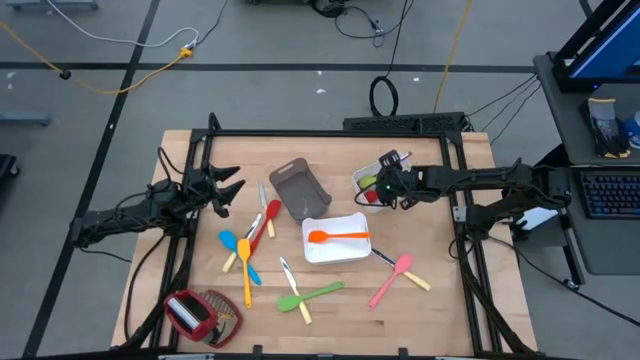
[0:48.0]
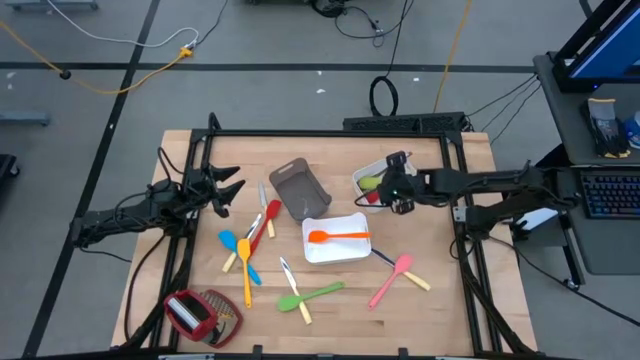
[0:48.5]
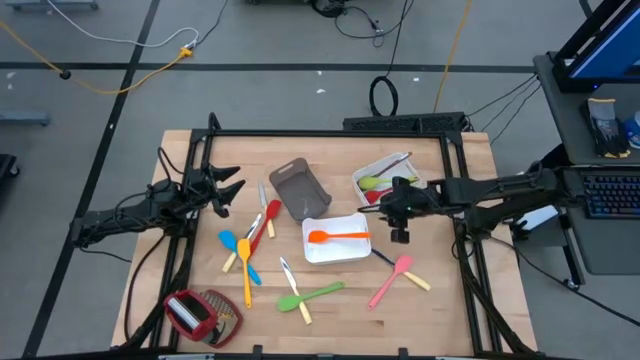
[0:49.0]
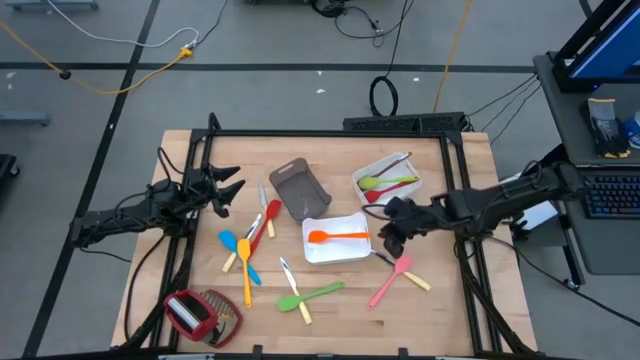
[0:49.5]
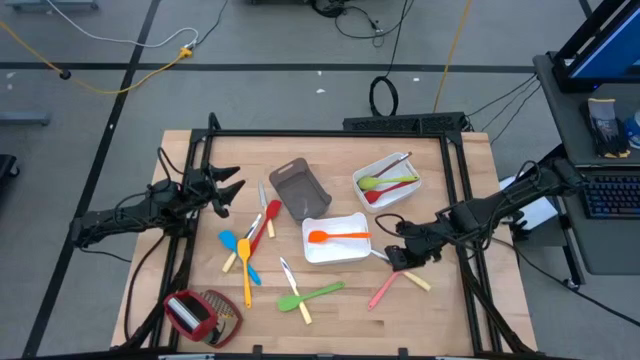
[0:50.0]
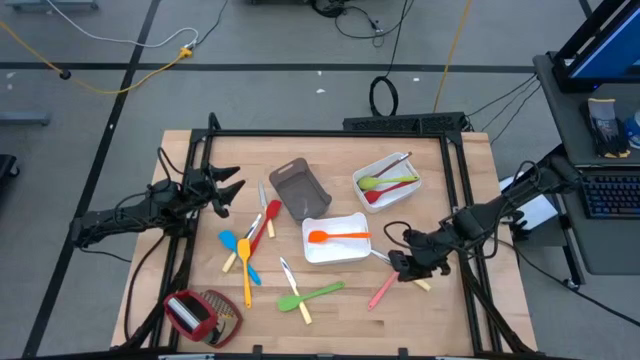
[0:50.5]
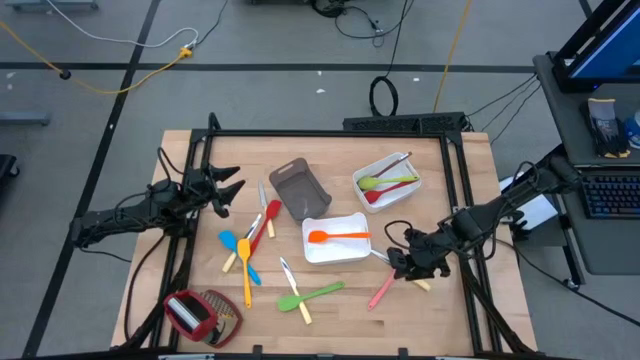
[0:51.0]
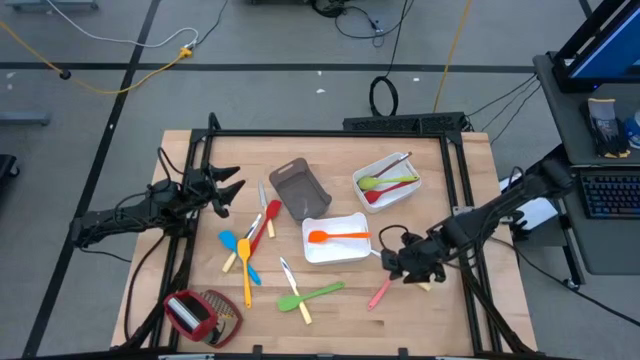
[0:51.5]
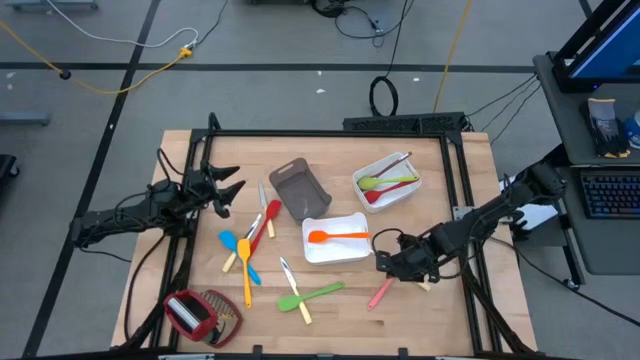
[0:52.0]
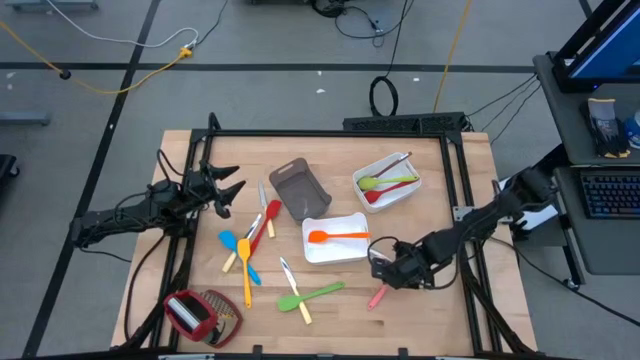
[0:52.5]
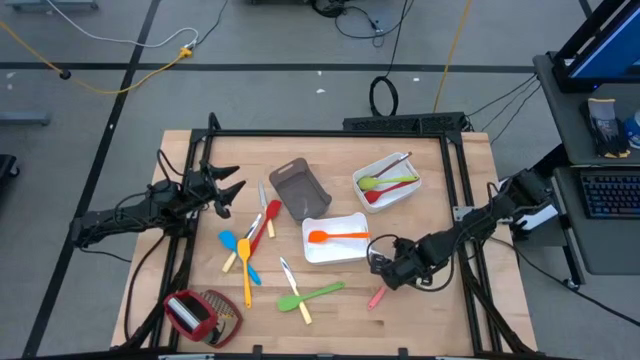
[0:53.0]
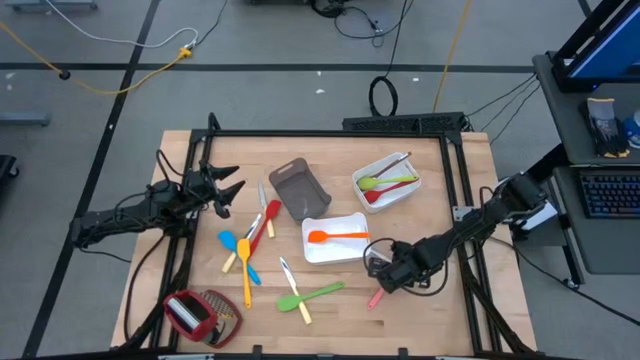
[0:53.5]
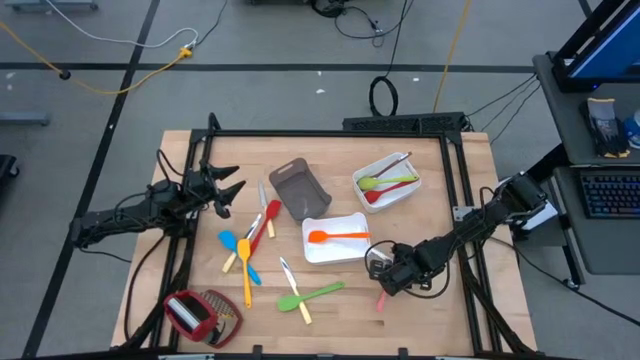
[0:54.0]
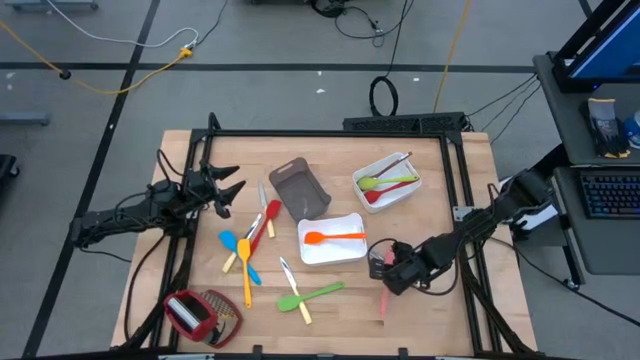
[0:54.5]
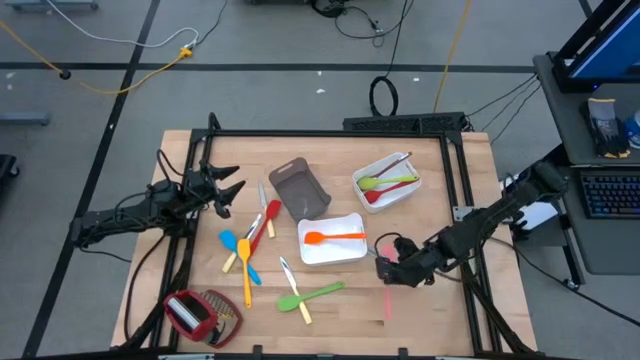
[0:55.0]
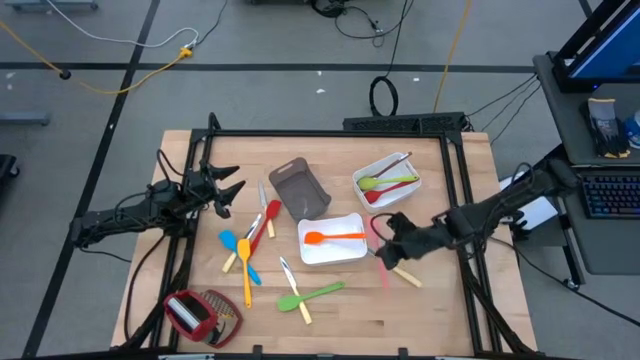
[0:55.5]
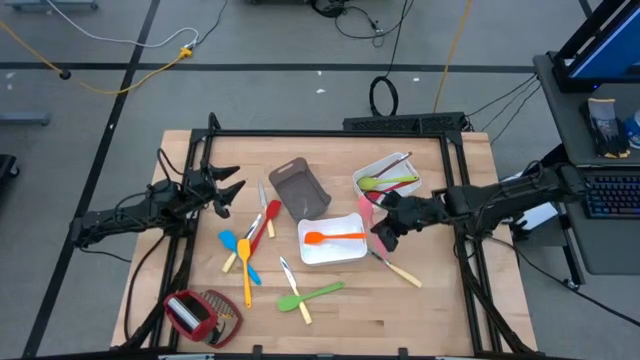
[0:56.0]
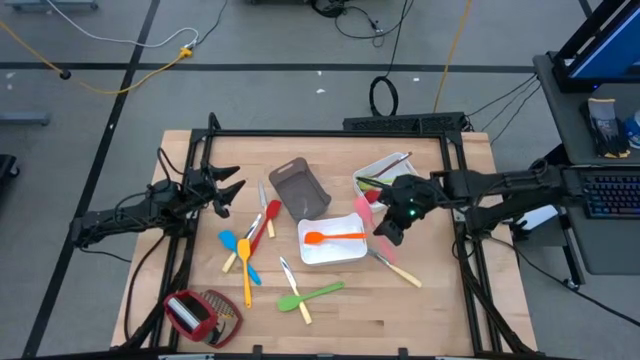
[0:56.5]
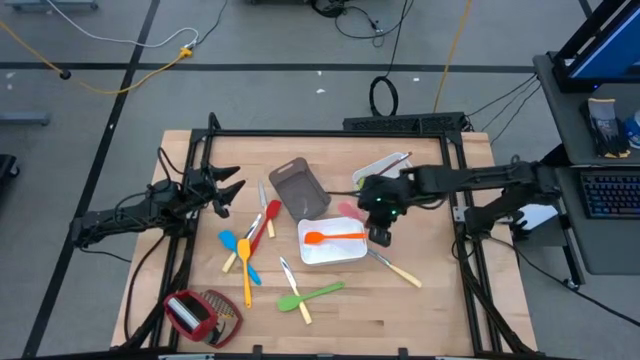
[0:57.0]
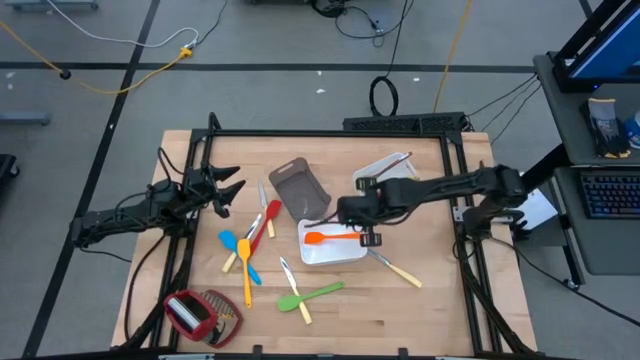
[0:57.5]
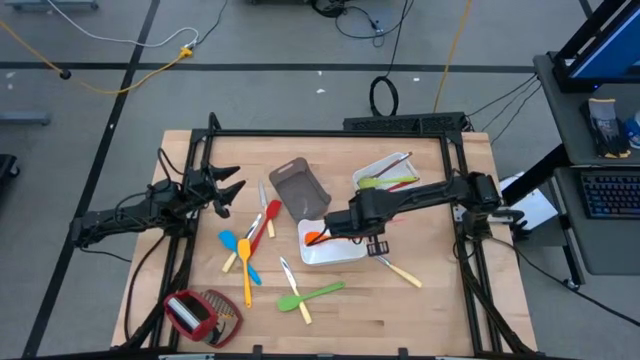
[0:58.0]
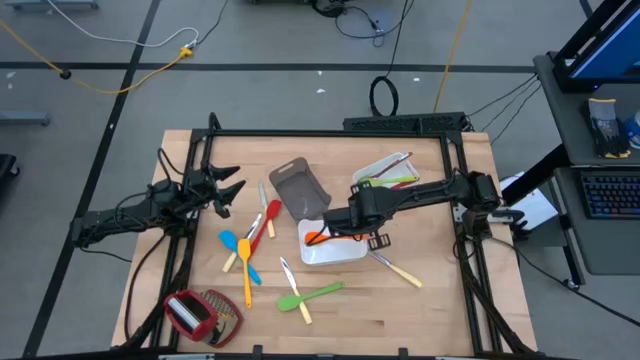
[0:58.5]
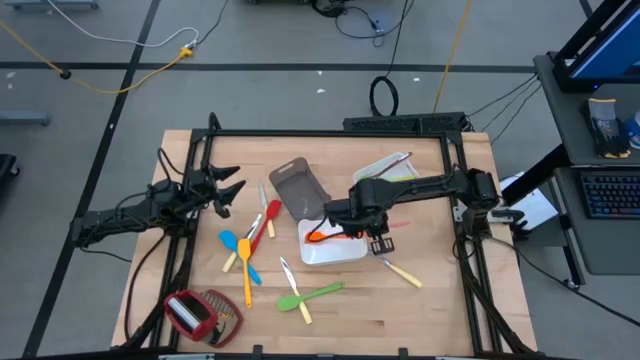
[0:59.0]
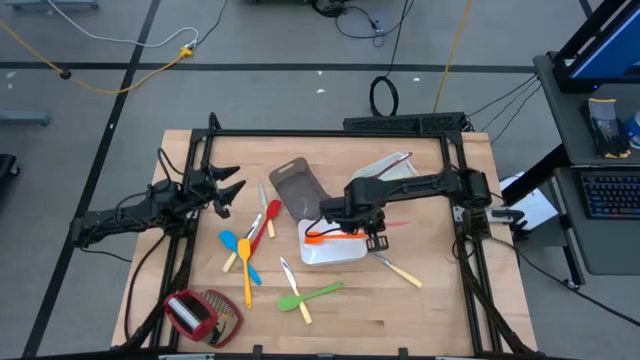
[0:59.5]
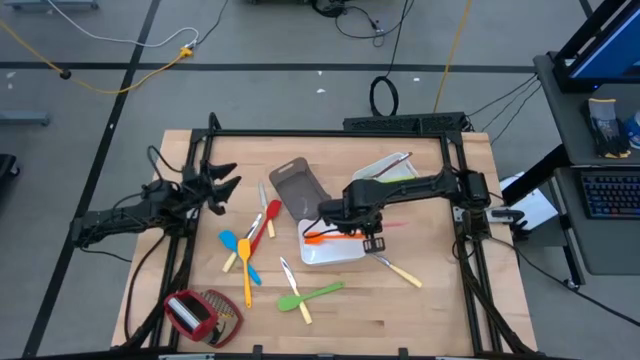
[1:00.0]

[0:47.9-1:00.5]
Task: Pick & Place Kitchen Items
Put the pink spatula into bottom white bin

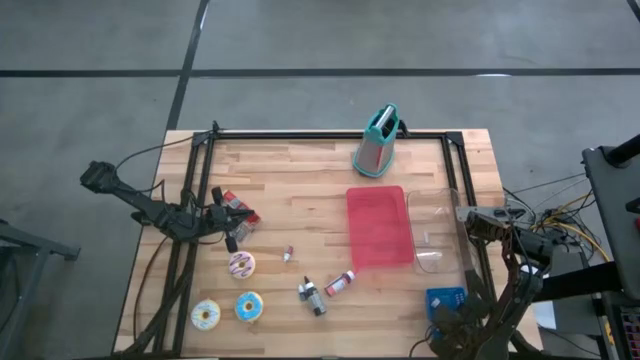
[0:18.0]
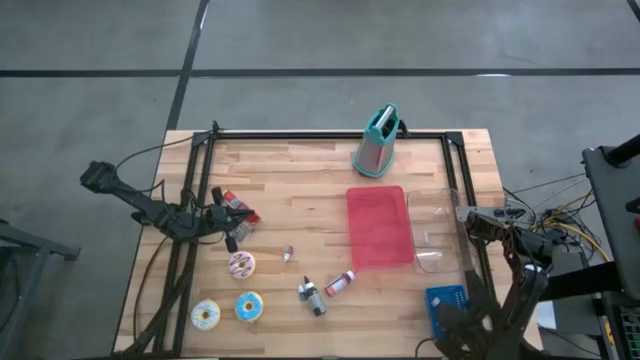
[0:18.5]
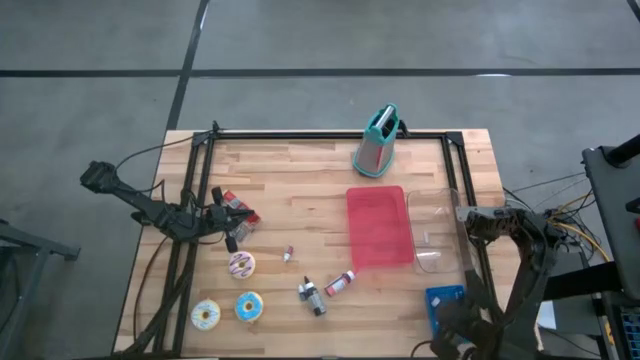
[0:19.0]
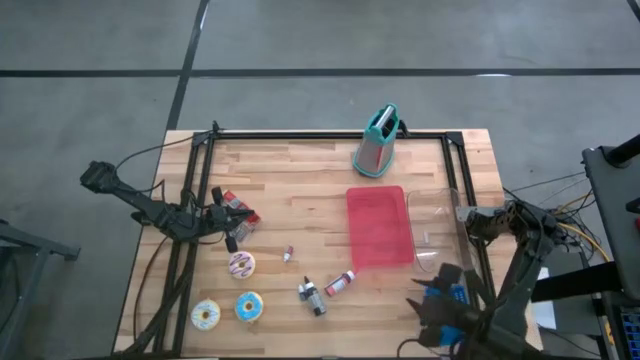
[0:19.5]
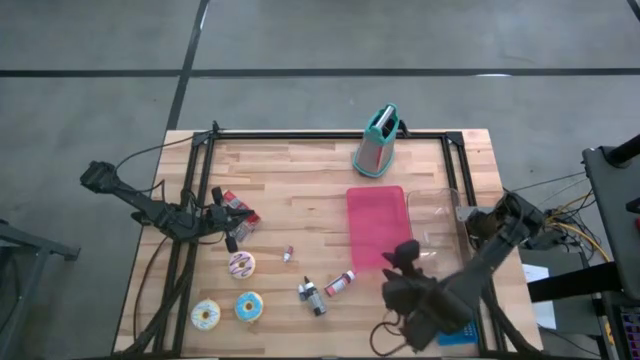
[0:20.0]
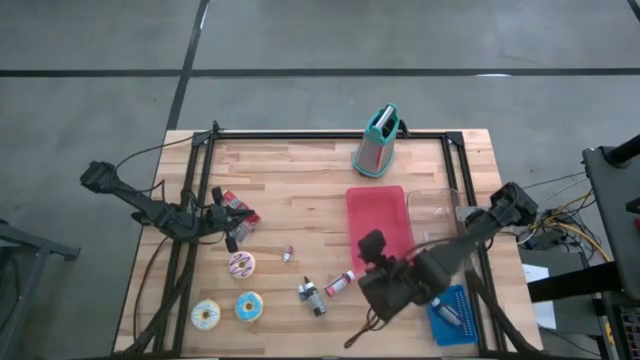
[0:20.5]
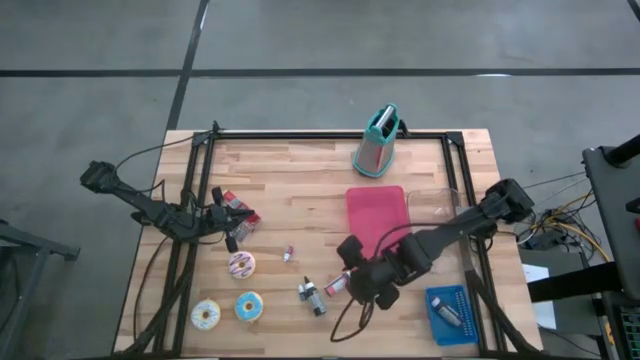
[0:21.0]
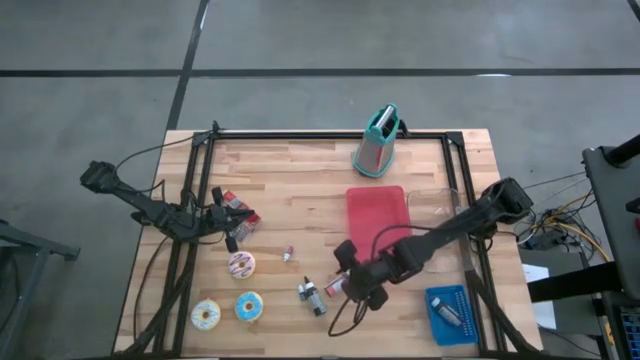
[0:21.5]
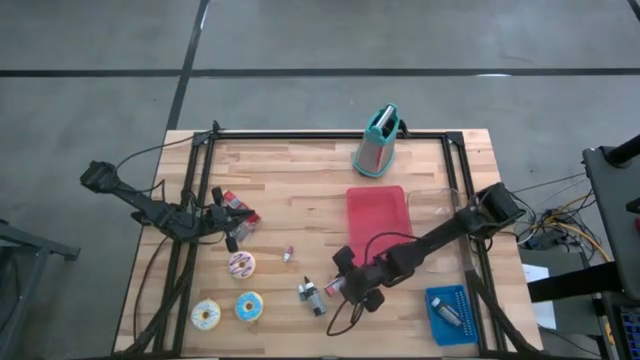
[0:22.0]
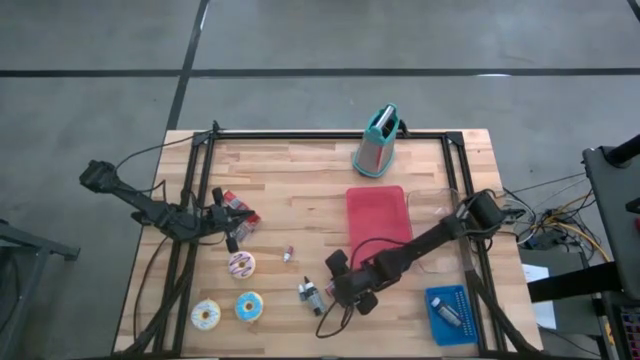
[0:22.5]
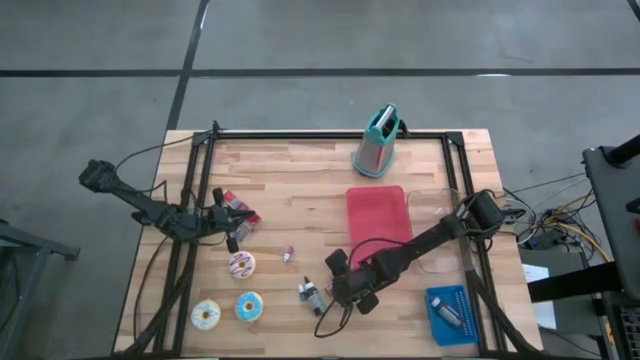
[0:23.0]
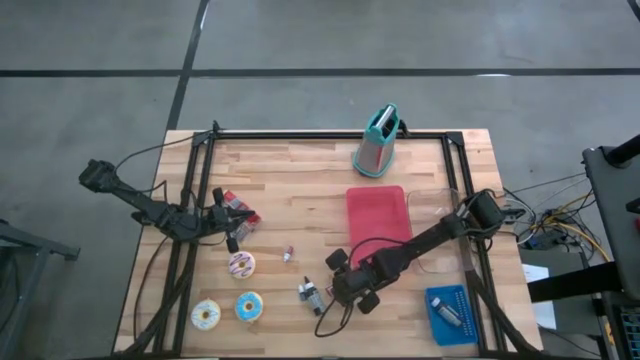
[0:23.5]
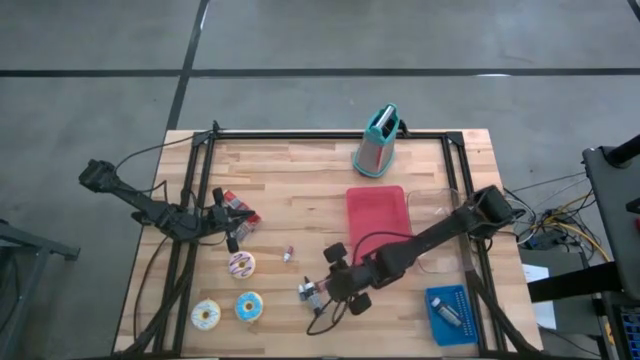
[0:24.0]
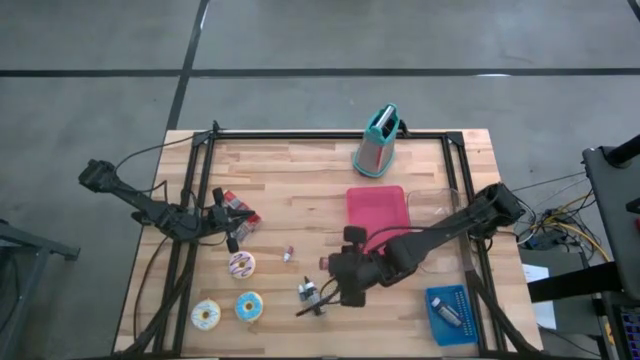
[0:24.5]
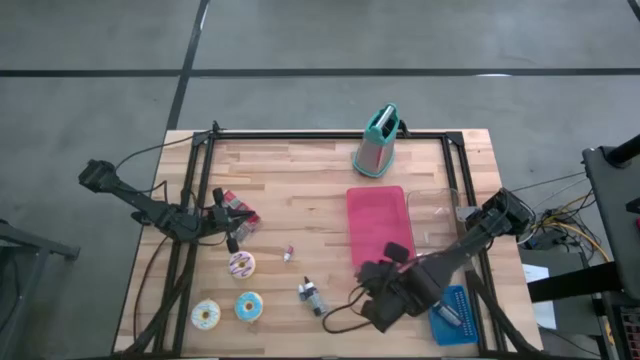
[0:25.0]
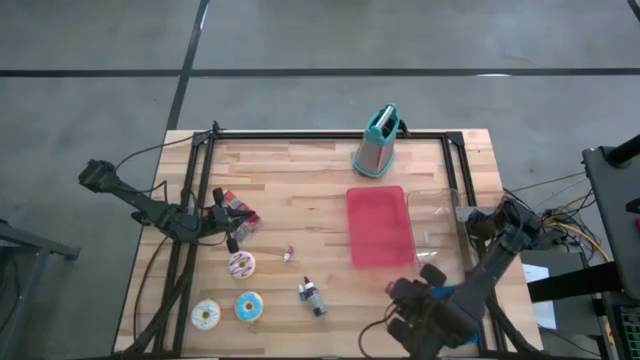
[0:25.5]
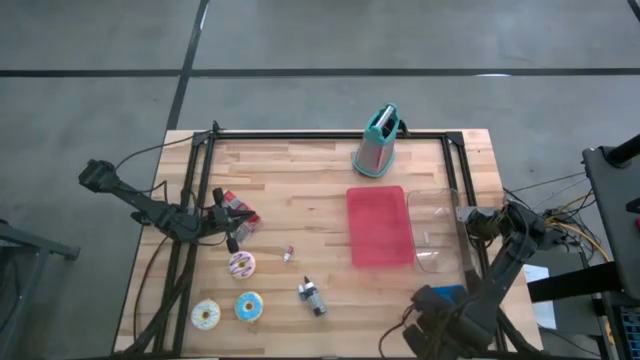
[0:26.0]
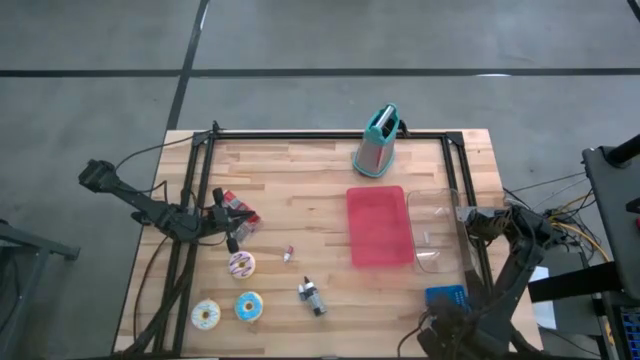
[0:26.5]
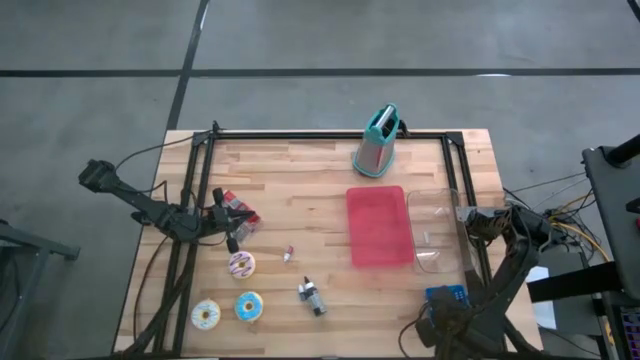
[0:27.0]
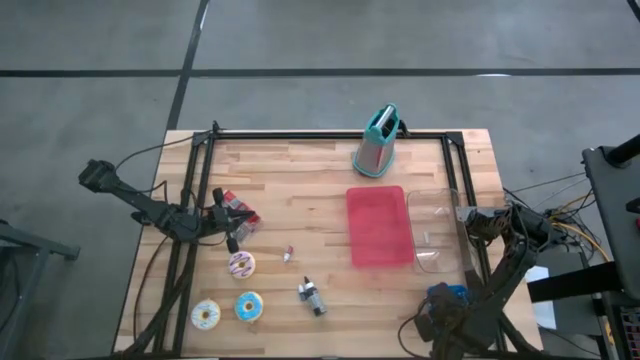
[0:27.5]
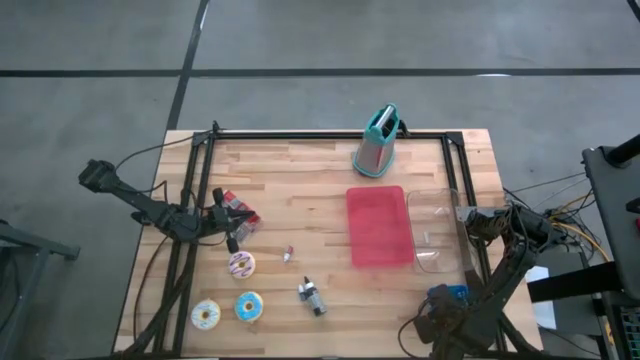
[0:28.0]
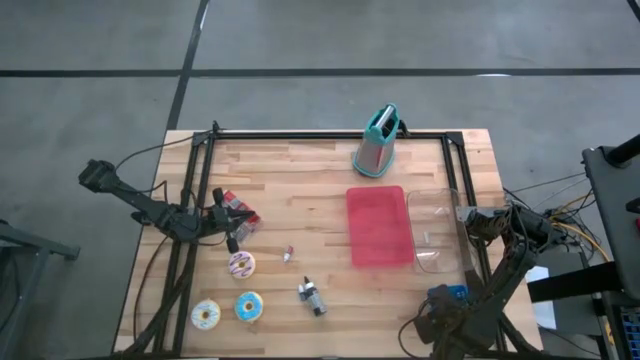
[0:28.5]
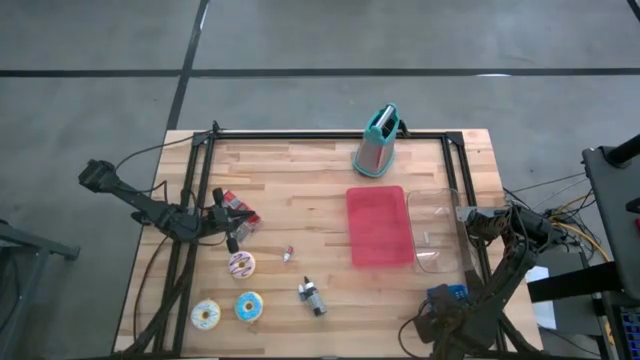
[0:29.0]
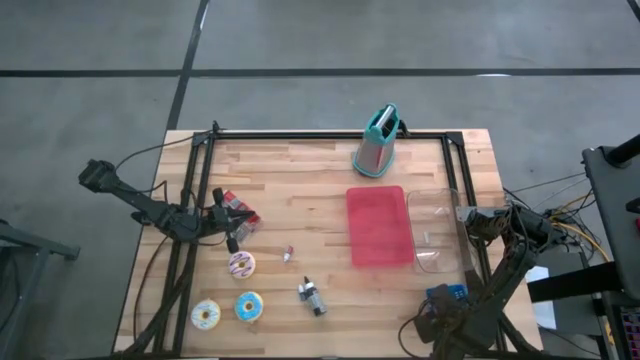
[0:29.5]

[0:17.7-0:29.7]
Task: Pick & Place Food Item
Put the pink food coloring bottle into the blue bin
